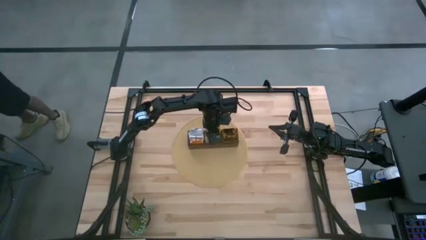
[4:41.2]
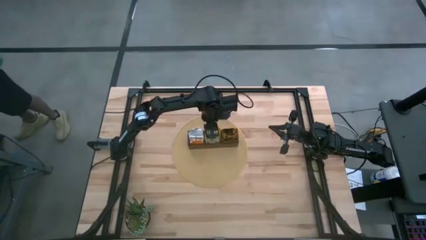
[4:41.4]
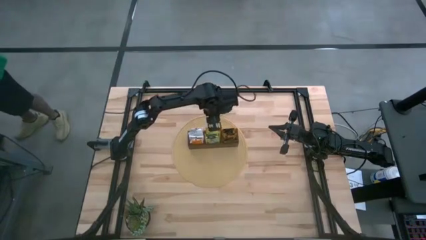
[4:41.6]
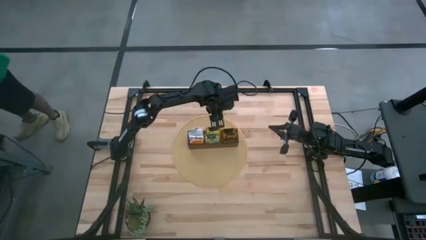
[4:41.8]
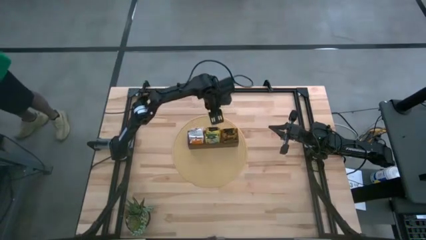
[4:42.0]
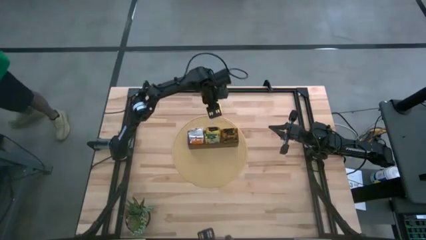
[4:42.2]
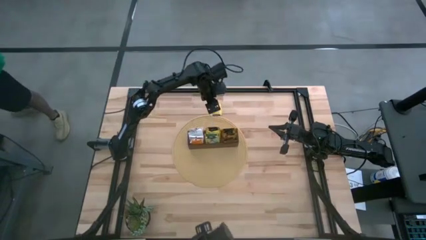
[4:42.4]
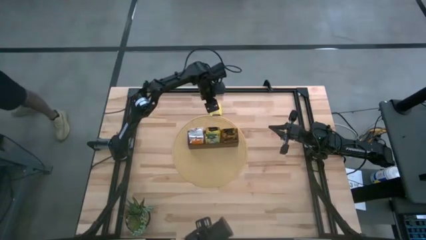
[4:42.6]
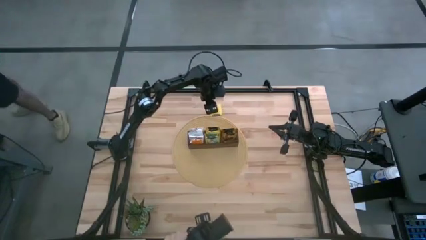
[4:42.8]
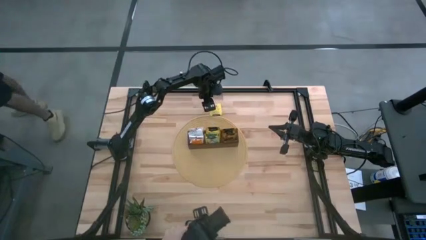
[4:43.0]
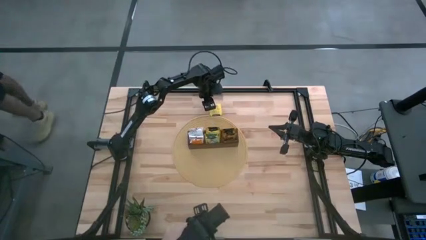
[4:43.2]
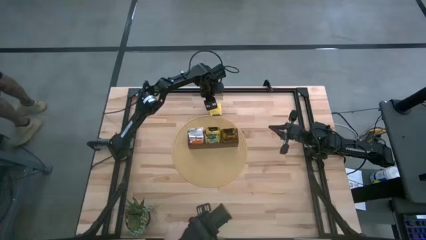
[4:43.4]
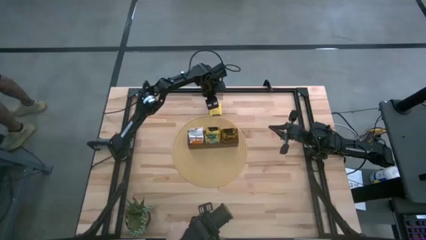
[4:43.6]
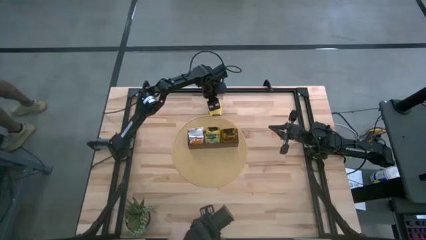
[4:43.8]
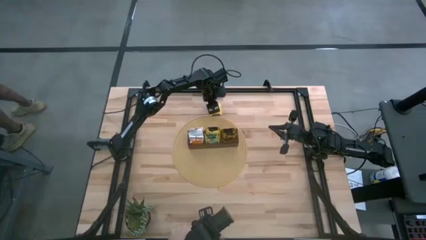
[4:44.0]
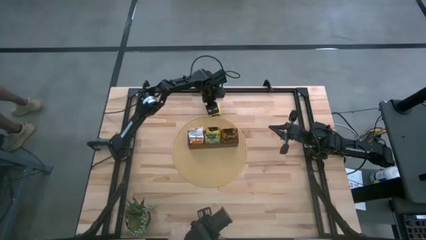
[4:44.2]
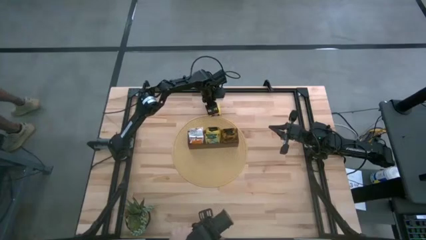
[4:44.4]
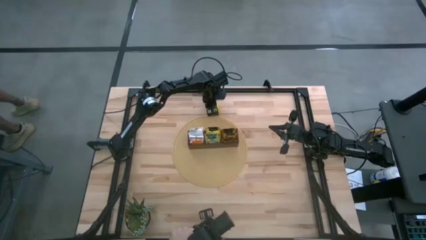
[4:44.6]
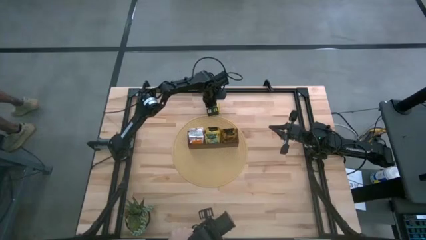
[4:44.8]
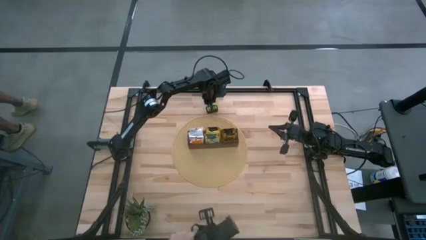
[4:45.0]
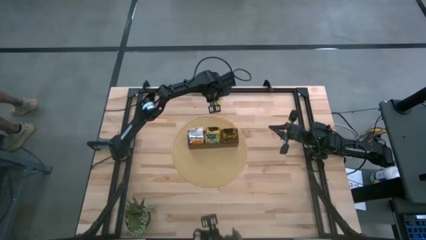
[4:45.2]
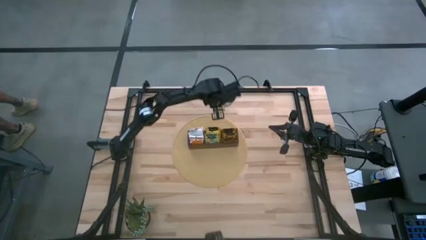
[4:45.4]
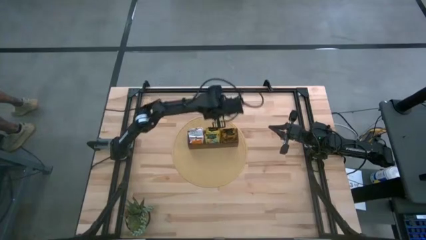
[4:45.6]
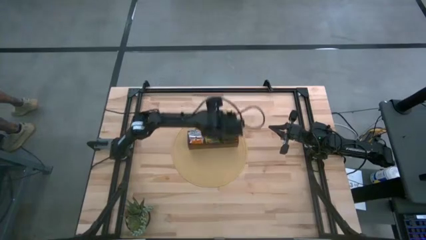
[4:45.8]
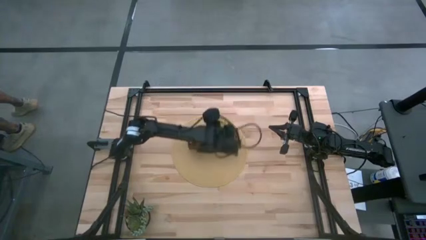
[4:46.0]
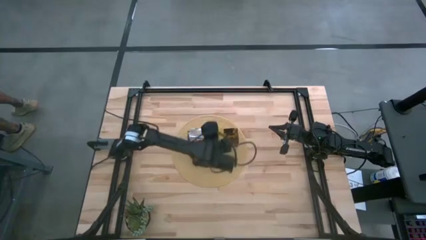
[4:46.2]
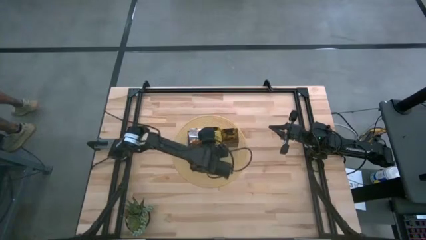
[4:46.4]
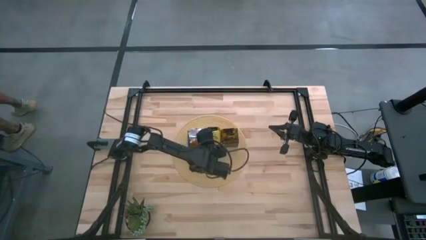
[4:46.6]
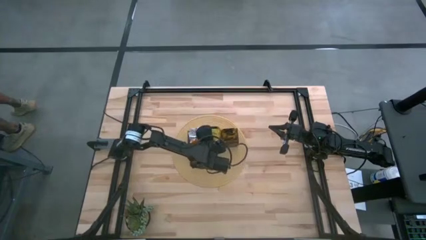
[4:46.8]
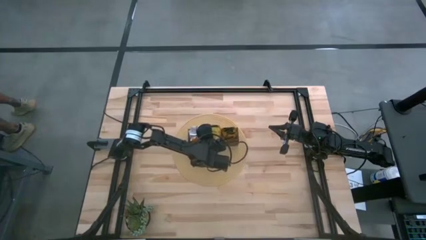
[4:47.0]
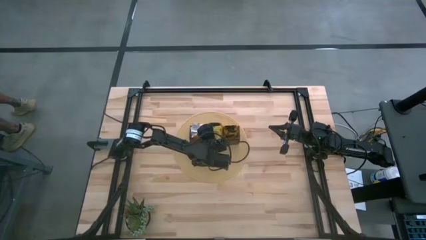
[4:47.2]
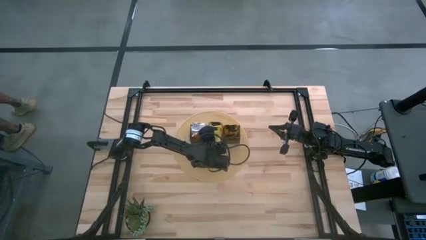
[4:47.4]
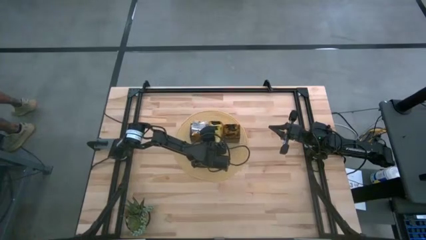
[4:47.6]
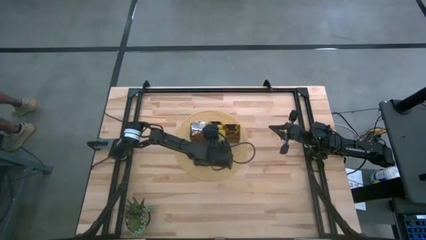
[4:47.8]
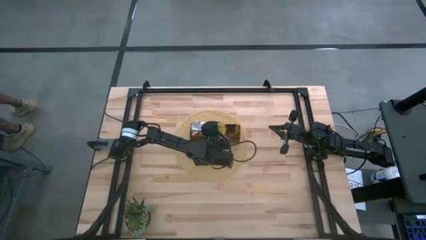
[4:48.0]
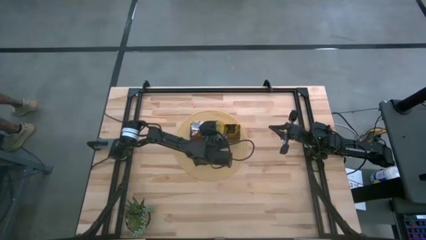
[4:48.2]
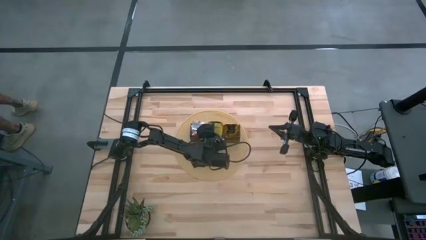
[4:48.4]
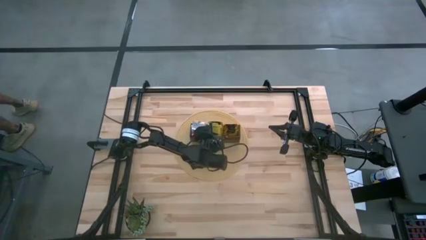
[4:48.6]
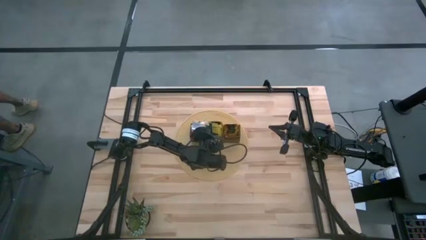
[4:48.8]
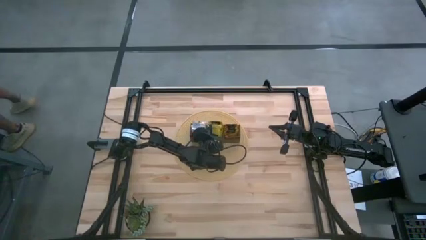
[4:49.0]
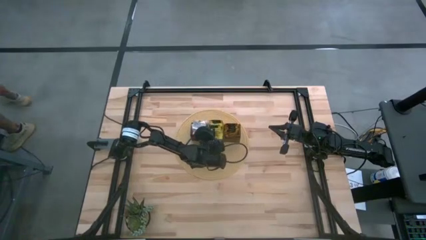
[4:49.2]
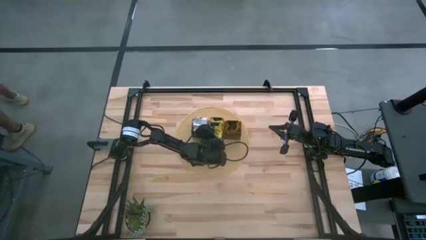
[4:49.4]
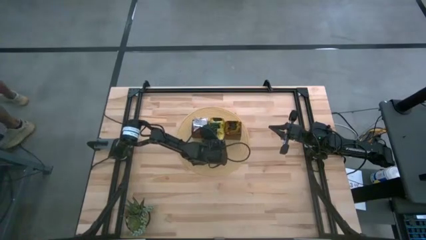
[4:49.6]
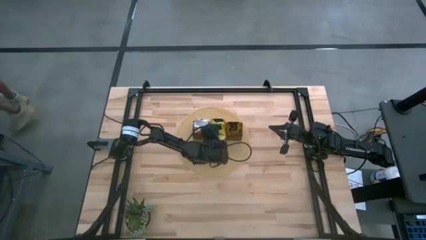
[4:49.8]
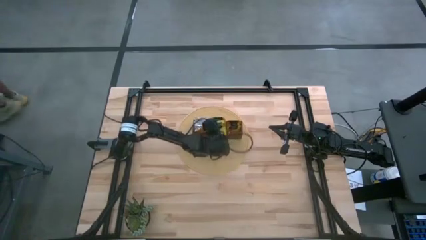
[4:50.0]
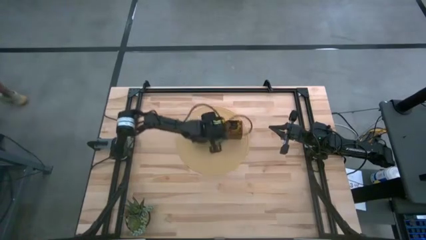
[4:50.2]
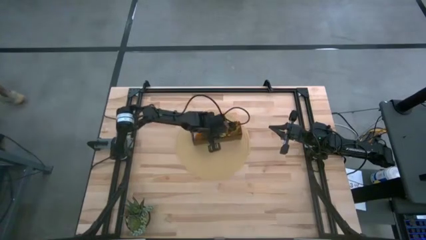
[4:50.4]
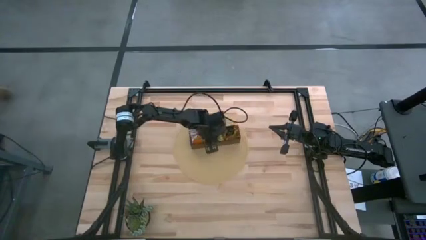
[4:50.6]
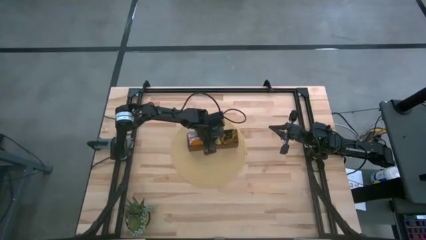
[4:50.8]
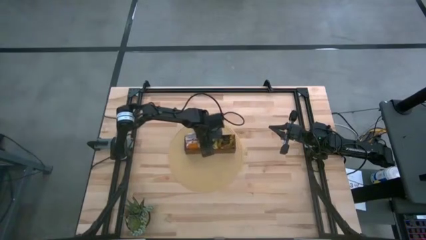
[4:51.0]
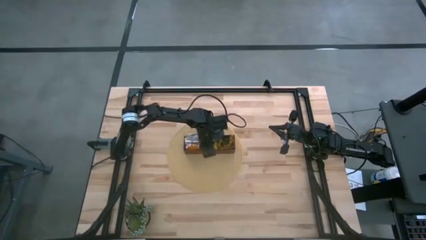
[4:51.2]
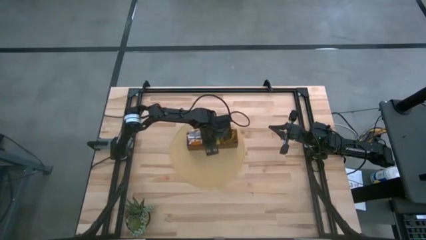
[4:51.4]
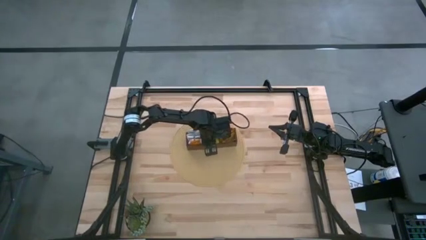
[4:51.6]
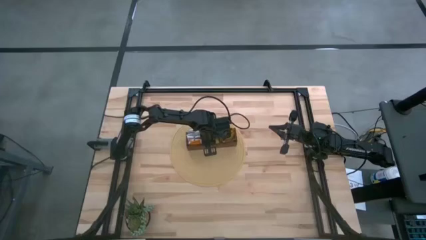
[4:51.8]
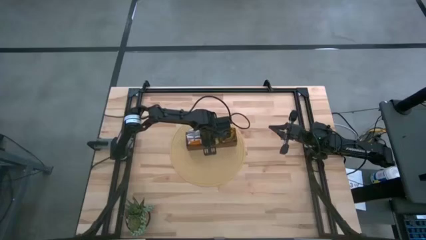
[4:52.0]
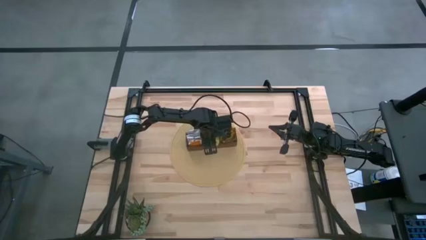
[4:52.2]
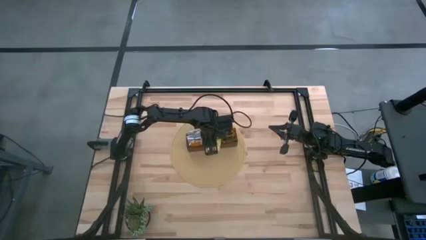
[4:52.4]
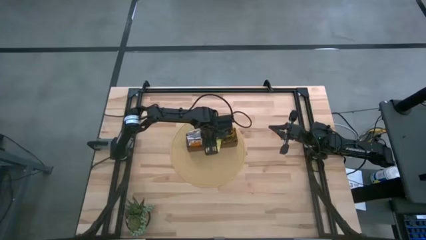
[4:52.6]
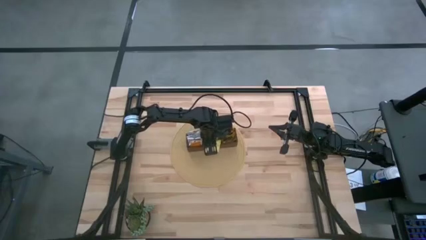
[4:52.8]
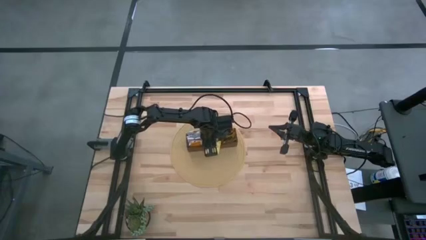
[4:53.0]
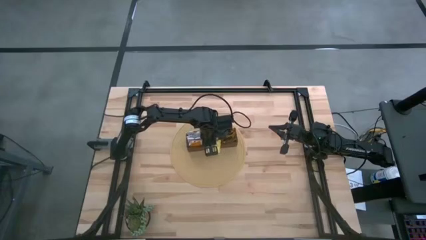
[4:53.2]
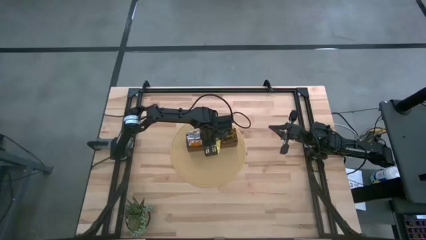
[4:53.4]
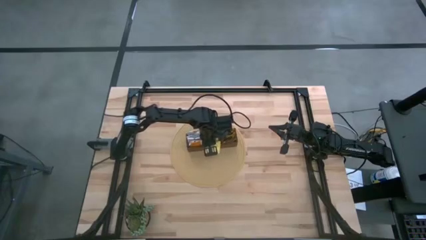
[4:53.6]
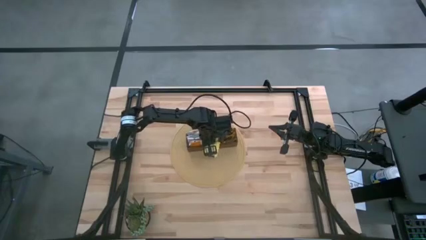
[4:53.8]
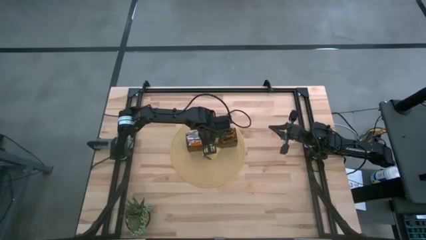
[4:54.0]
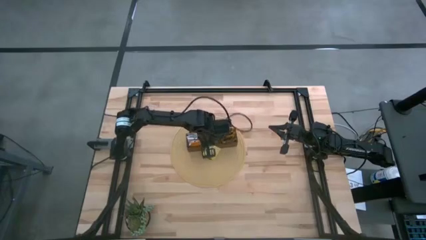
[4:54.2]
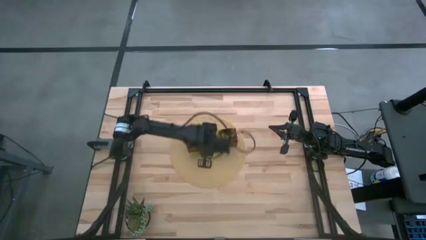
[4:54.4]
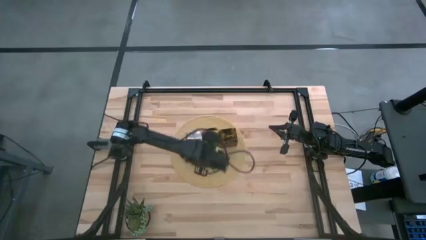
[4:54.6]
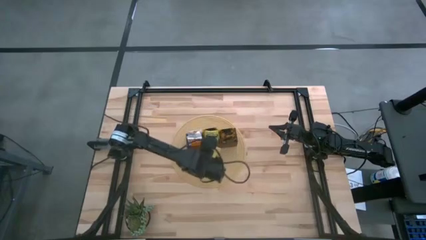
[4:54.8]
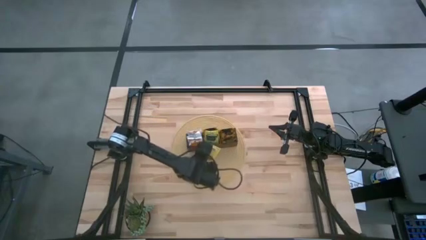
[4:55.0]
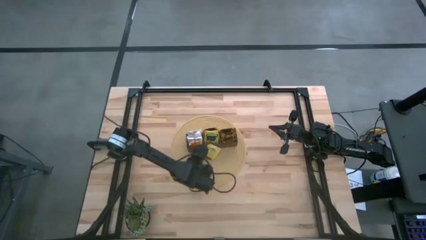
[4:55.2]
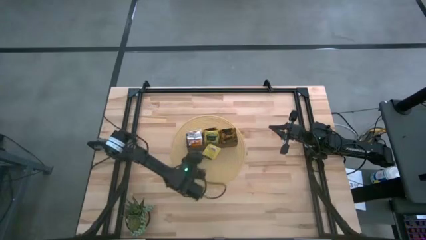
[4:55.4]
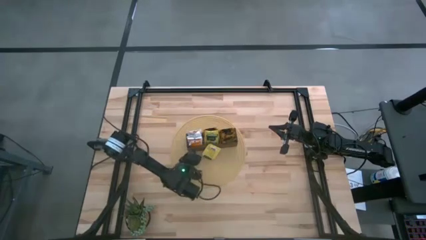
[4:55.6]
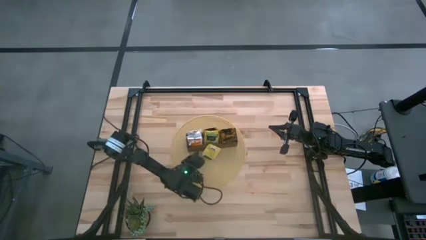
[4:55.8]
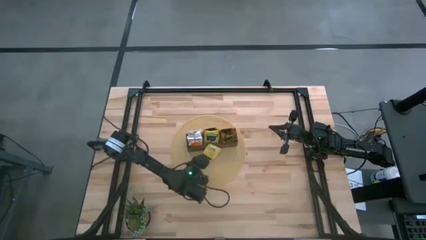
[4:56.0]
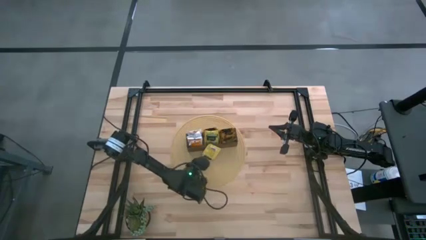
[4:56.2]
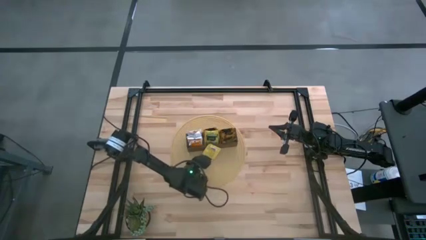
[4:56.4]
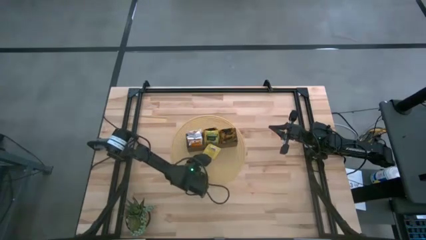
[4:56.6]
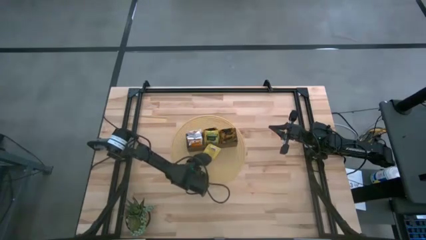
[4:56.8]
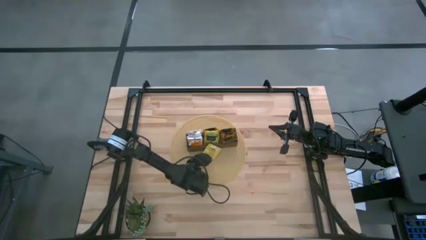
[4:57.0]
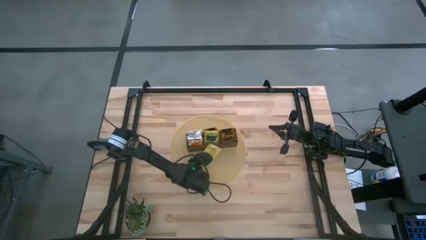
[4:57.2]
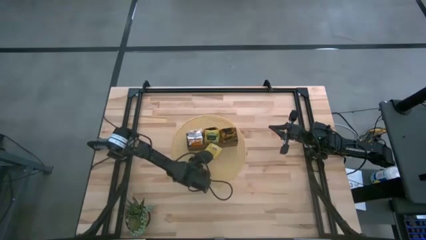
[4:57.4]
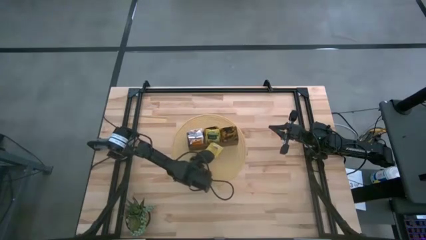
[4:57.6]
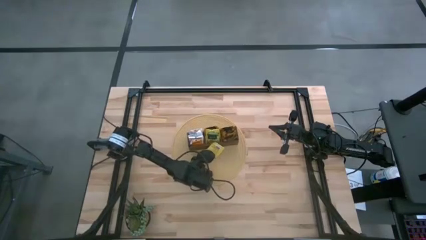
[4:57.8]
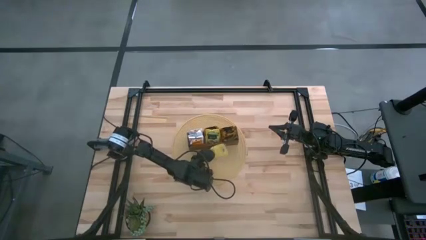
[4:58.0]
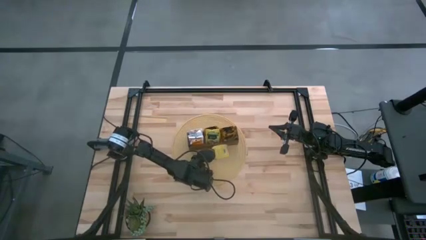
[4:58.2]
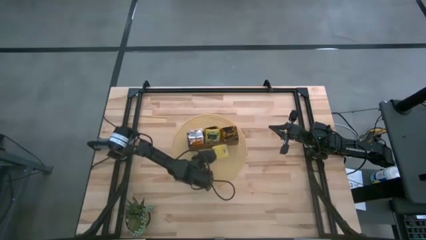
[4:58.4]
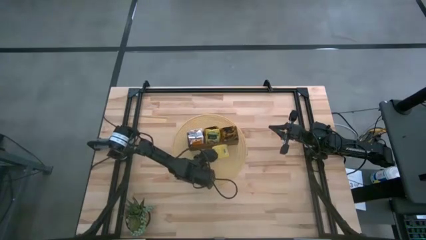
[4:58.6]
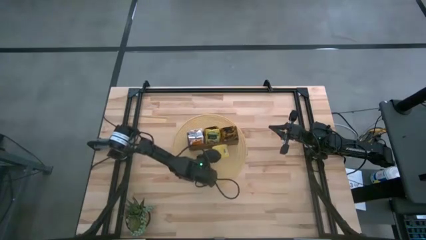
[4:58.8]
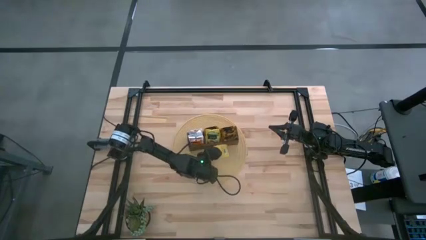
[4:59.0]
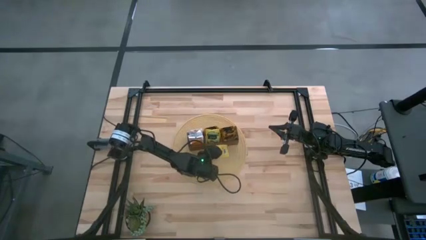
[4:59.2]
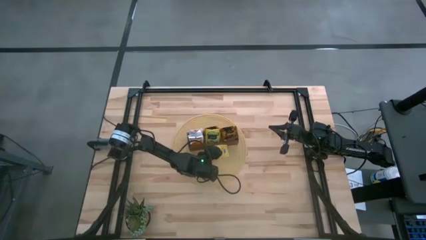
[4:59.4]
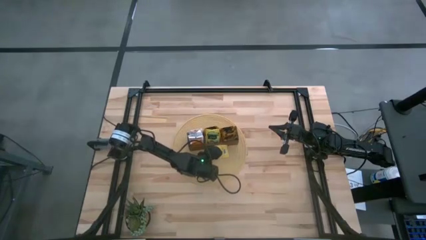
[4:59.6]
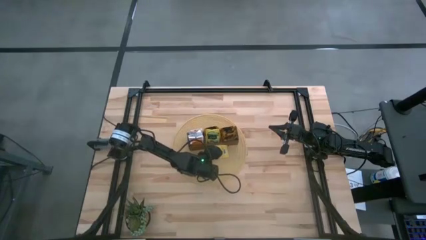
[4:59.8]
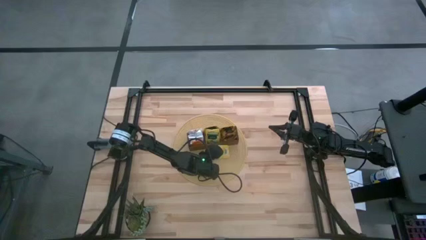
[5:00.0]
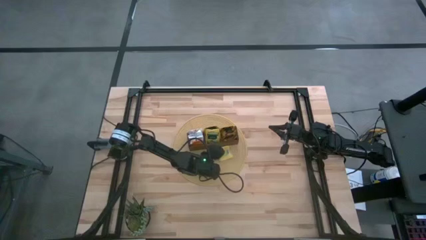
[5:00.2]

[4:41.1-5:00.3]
Task: Pick & Place Tea
Put the yellow tea bag into the wooden organizer
